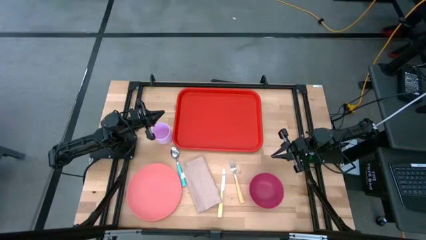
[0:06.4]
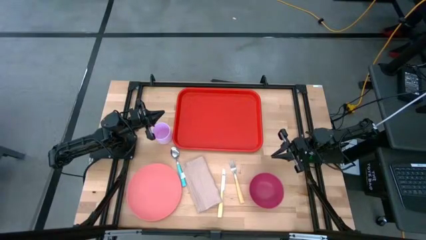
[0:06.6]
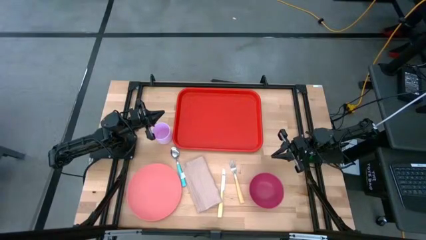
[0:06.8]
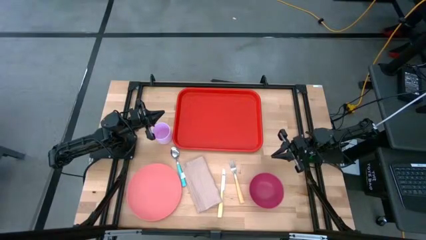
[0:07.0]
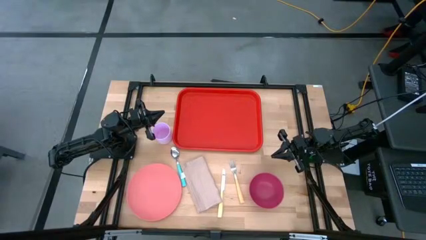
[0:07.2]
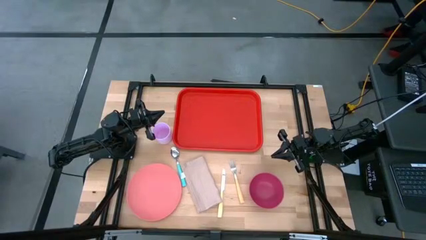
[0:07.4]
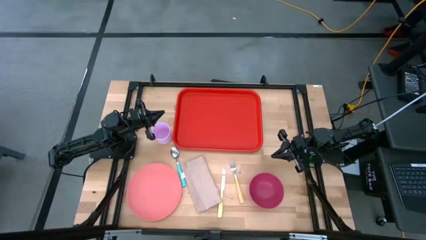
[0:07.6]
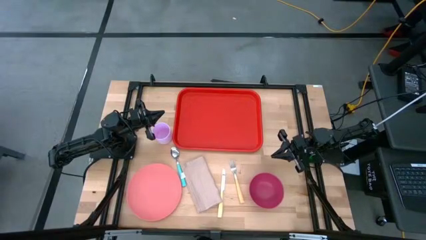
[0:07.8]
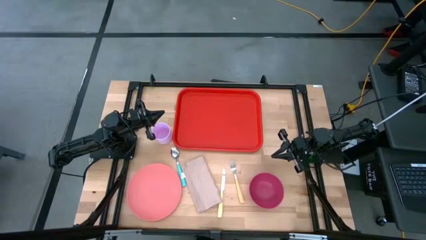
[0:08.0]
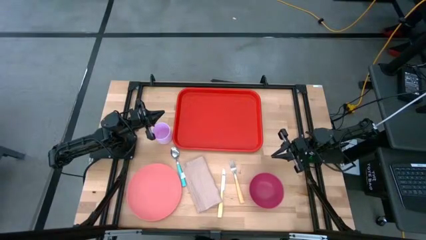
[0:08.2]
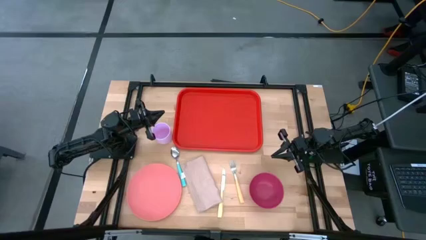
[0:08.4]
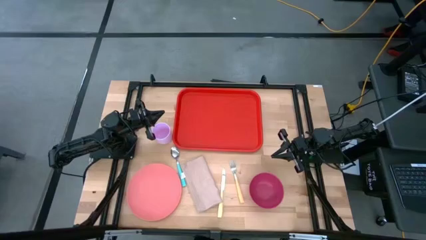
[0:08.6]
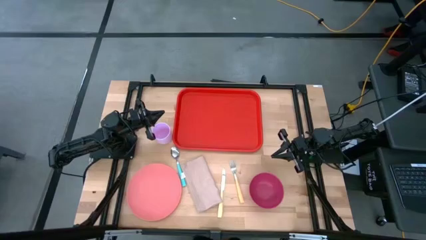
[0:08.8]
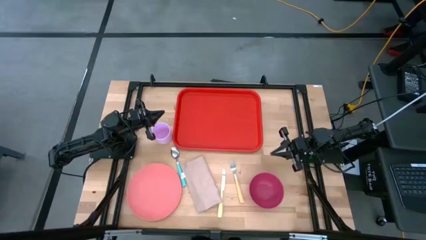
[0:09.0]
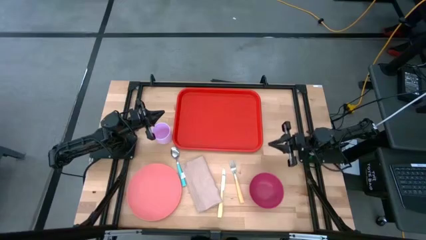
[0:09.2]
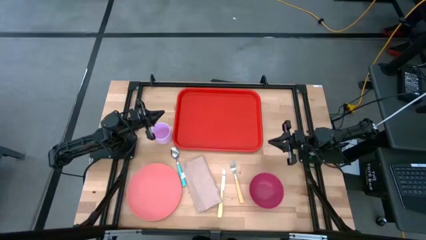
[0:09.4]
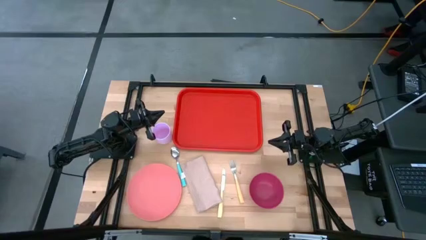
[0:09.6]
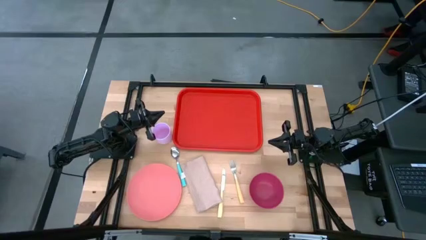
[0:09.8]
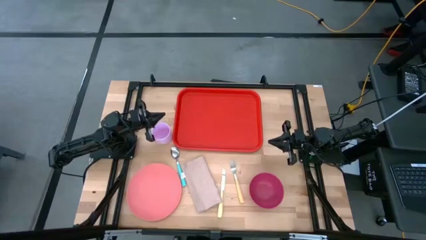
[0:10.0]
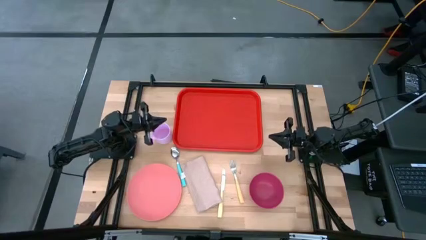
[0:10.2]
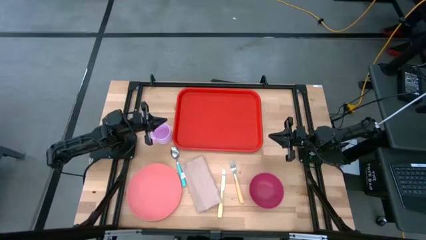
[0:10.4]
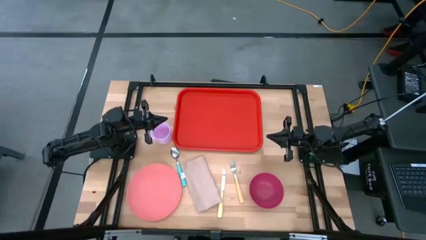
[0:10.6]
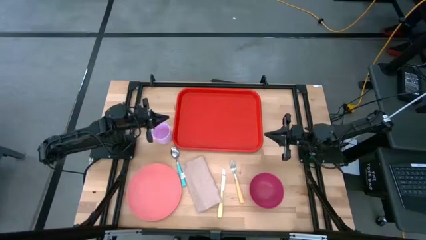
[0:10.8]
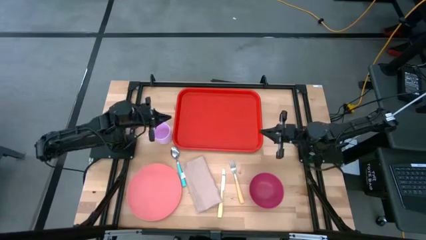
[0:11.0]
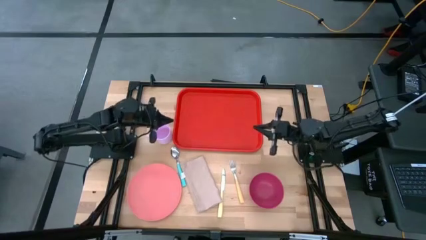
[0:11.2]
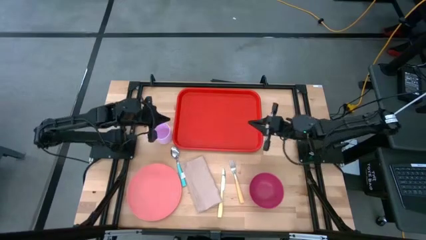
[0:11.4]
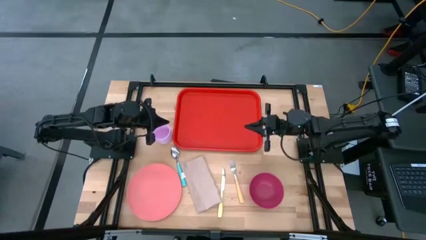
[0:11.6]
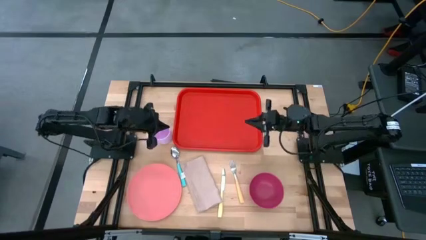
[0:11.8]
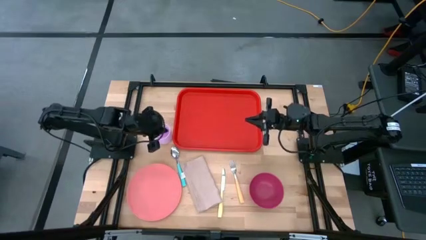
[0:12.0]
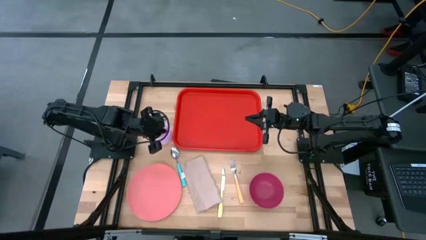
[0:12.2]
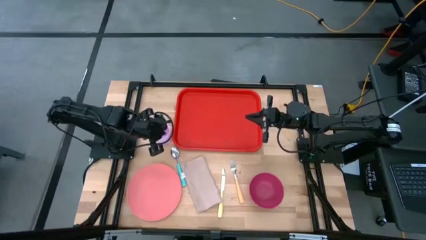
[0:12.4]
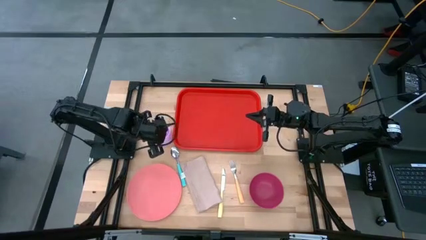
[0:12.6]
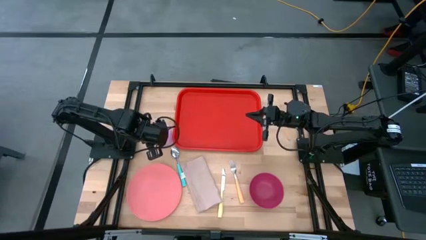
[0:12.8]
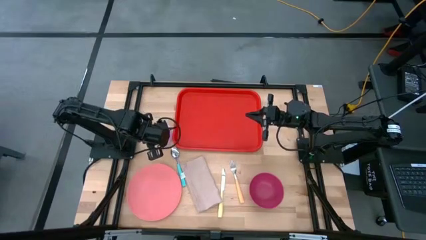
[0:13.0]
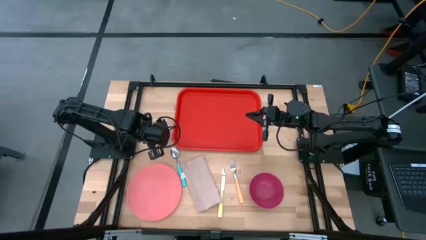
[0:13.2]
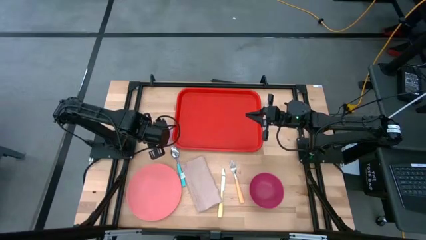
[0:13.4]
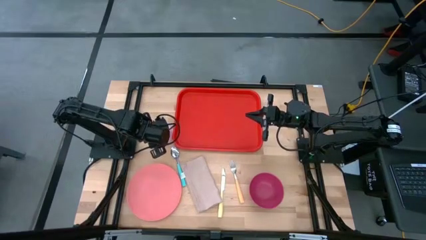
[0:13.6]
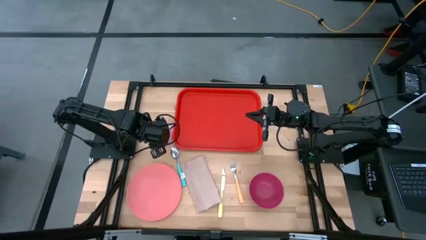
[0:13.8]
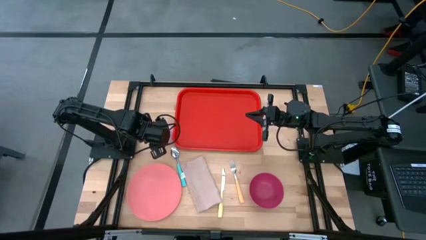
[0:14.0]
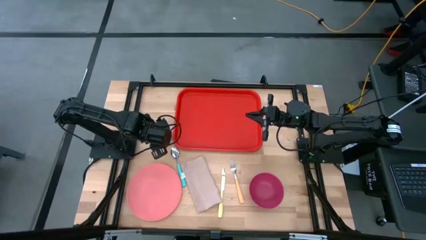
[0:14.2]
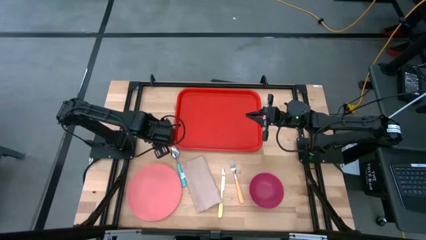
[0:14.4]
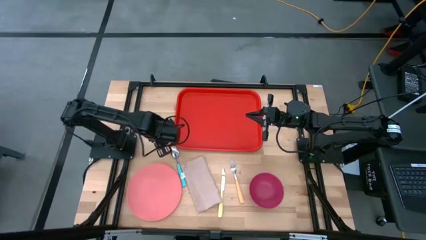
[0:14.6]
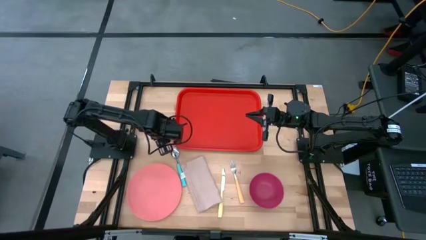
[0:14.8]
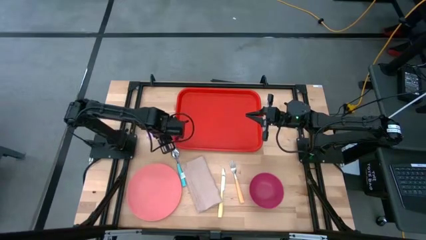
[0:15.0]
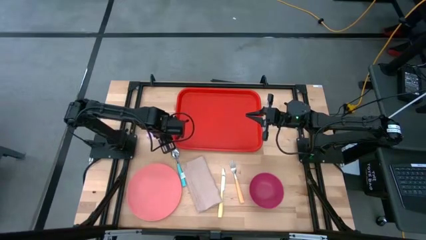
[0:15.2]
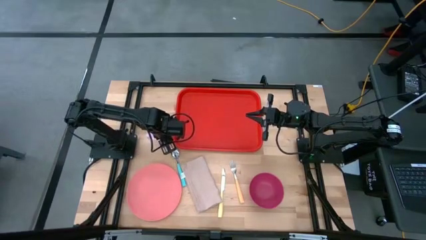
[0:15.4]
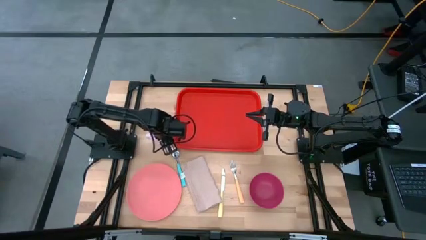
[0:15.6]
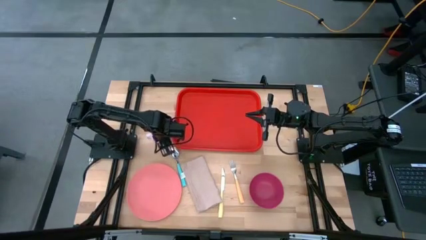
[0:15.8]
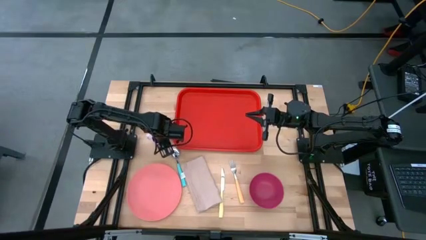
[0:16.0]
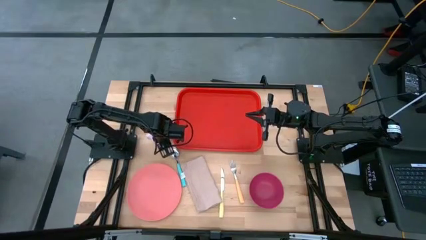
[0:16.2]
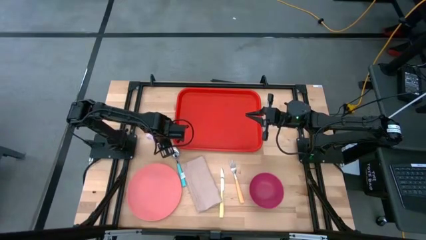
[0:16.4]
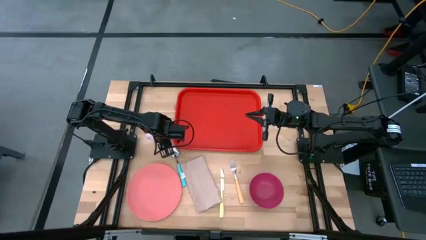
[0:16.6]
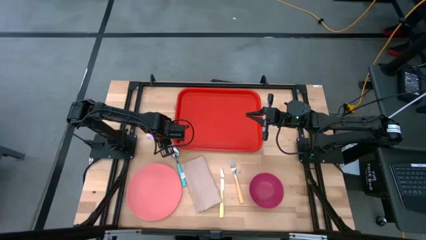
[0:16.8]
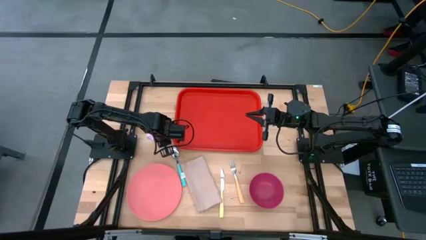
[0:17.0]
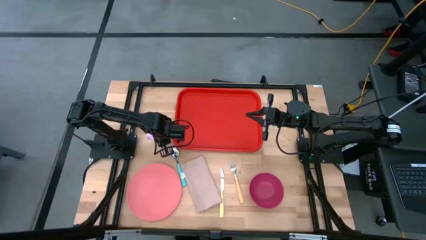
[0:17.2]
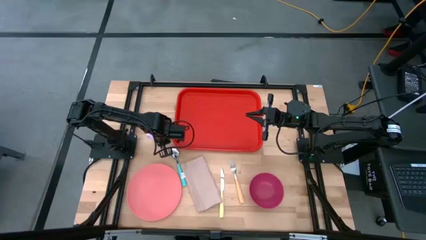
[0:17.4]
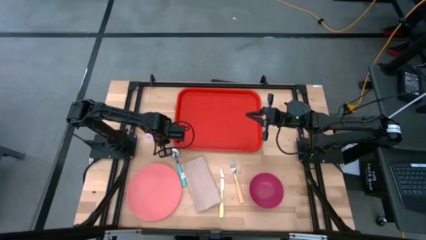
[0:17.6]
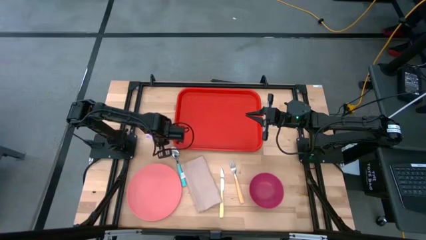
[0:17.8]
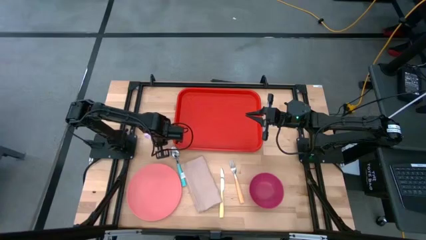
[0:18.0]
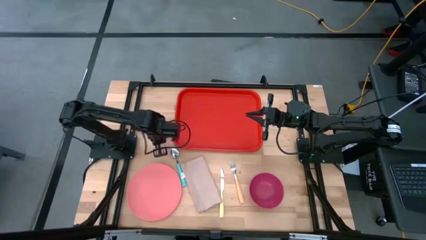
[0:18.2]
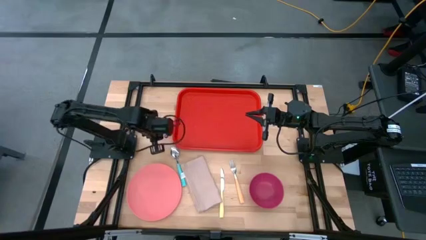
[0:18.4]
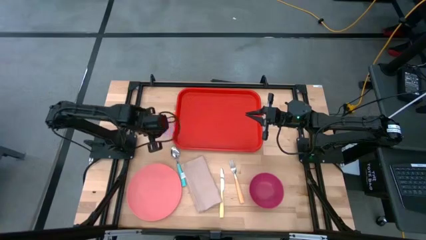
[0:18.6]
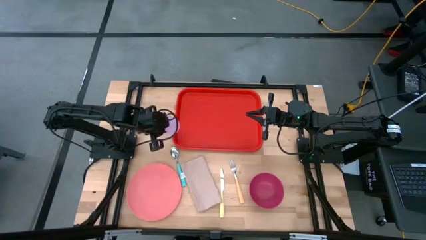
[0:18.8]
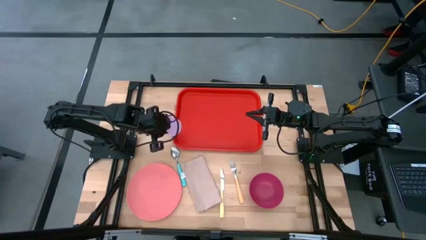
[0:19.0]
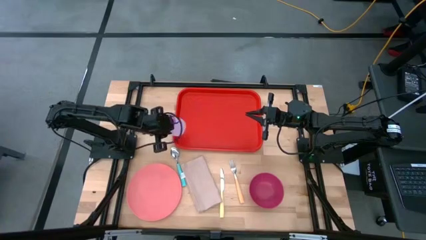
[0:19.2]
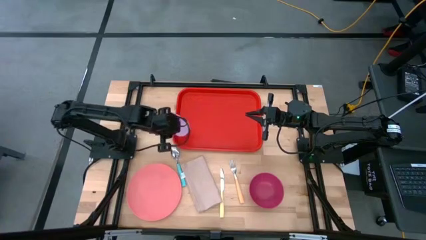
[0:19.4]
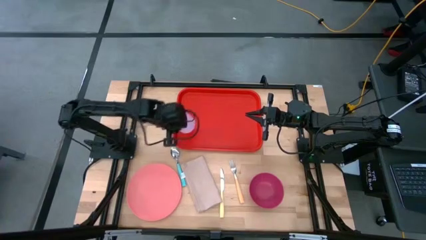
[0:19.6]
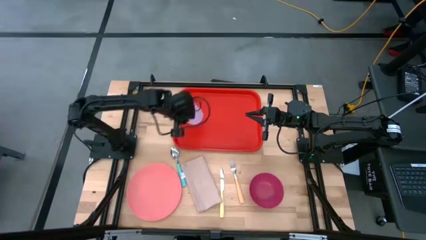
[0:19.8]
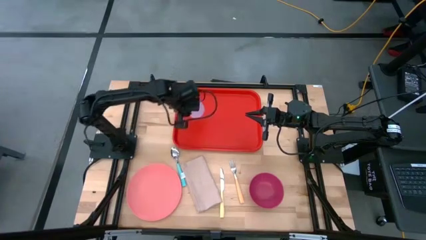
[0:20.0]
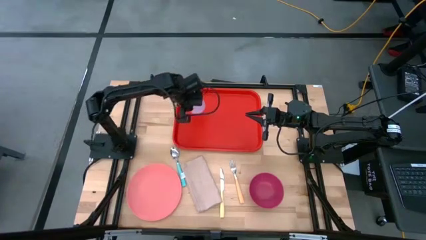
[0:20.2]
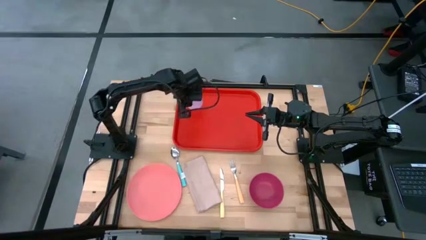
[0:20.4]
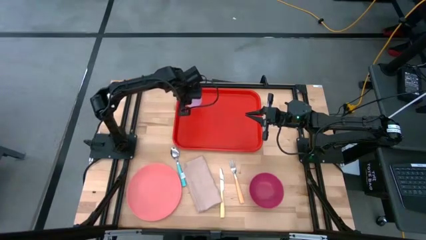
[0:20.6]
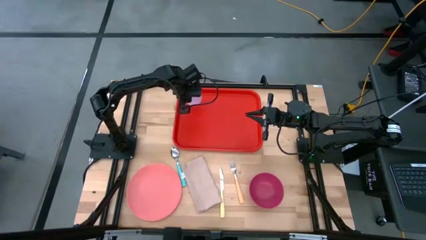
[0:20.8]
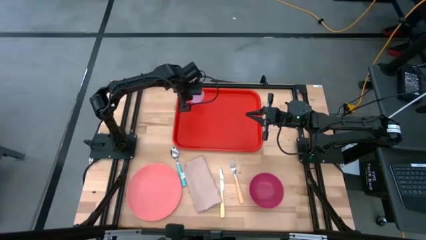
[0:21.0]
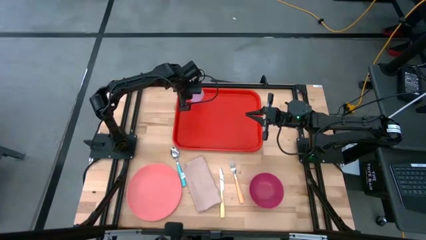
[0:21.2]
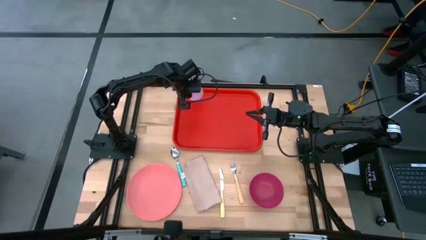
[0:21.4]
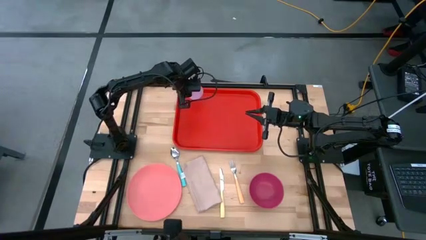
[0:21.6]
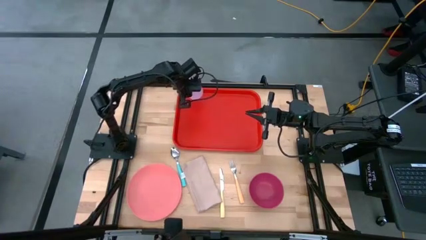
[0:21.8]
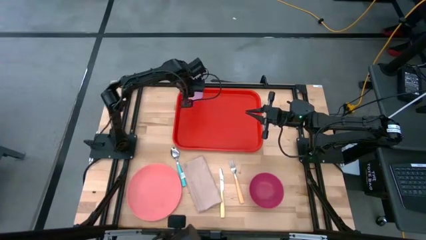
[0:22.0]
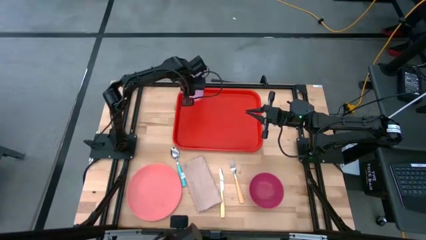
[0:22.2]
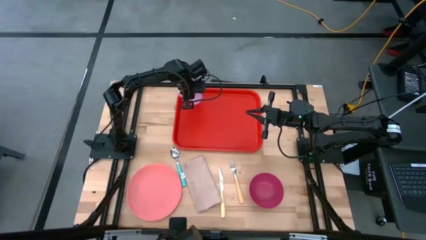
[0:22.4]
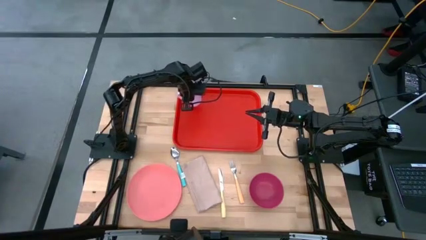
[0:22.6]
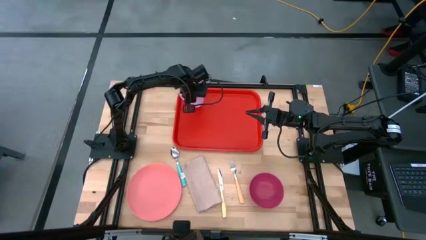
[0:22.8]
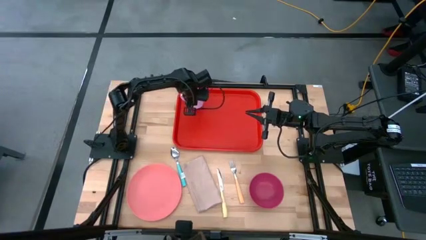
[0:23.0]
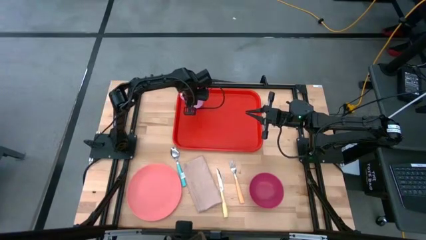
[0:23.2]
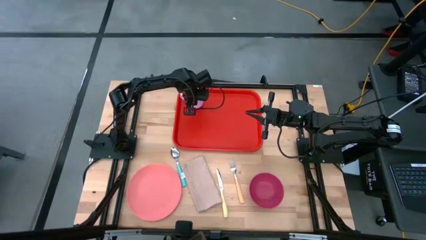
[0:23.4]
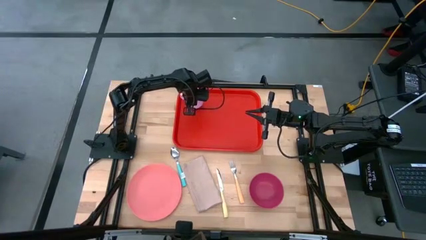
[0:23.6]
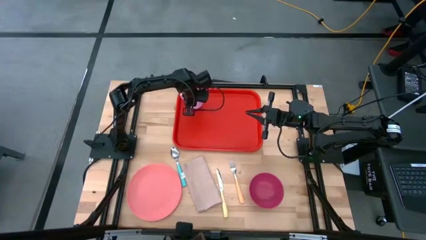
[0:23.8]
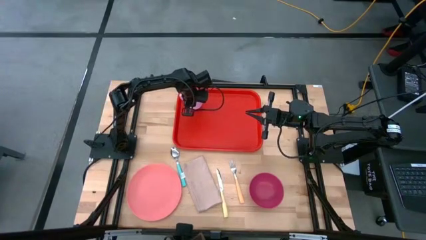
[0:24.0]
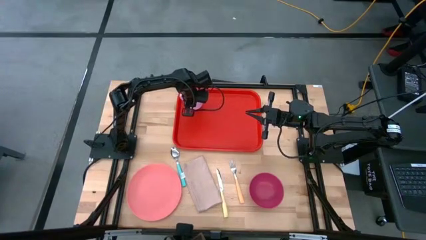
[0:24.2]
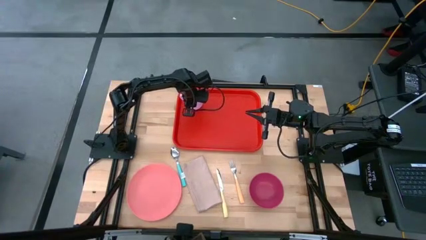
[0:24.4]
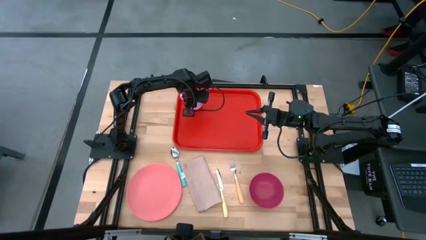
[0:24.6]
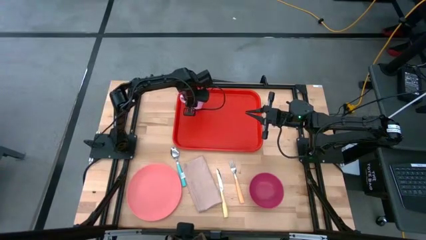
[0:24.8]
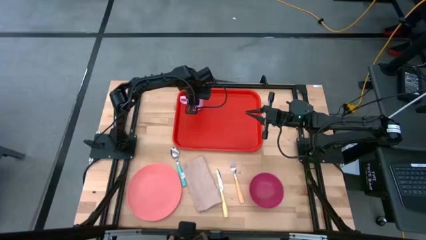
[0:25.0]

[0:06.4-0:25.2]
Task: Set up tray
Put the purple mug in the top left corner of the red tray
